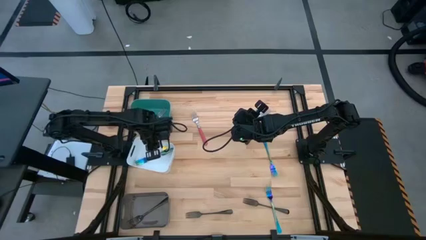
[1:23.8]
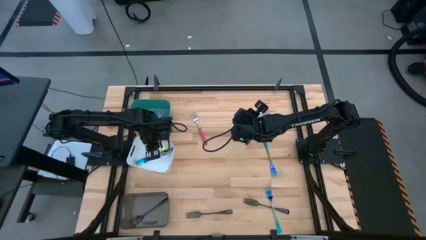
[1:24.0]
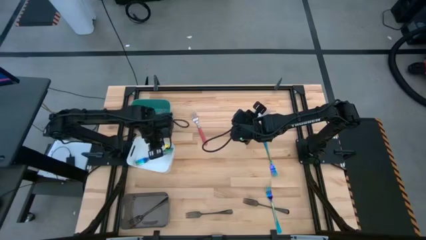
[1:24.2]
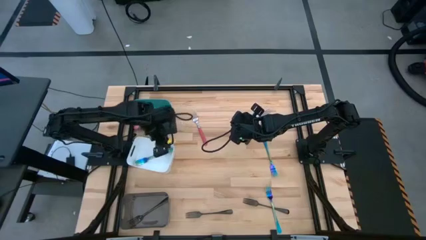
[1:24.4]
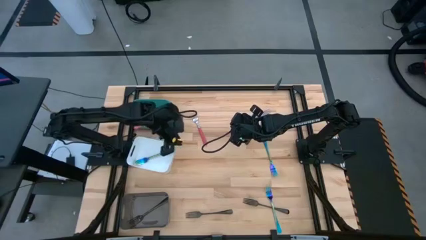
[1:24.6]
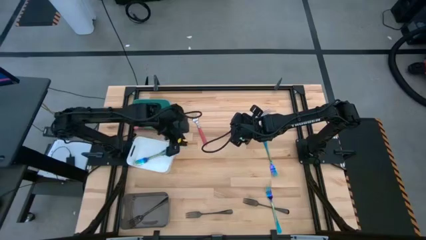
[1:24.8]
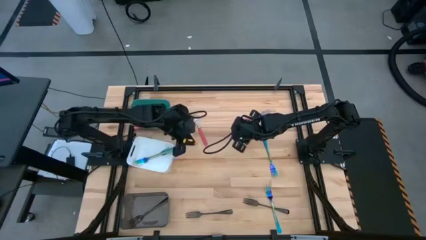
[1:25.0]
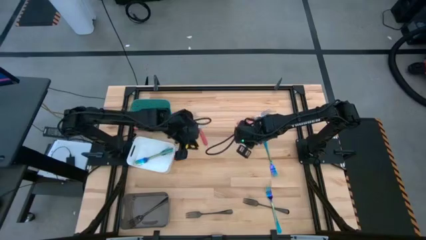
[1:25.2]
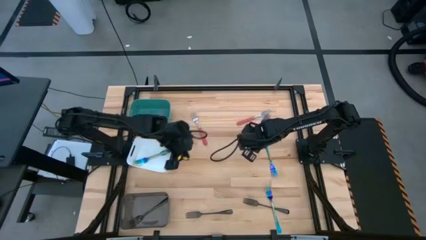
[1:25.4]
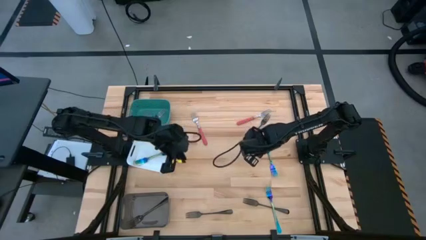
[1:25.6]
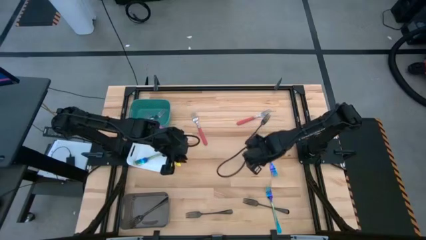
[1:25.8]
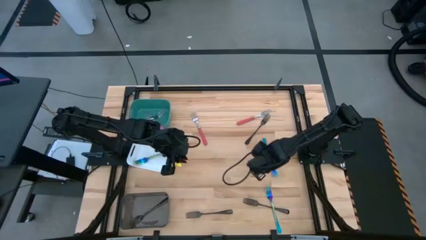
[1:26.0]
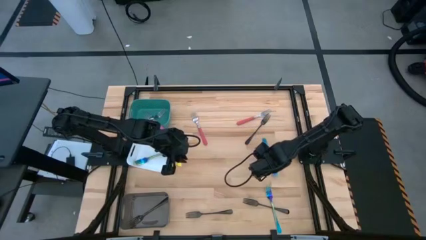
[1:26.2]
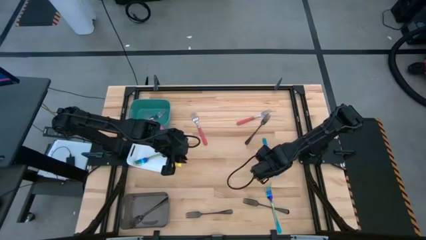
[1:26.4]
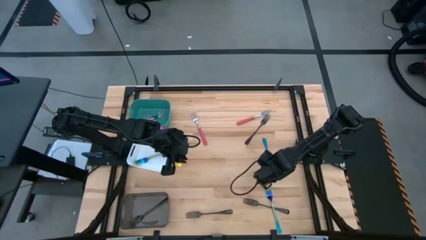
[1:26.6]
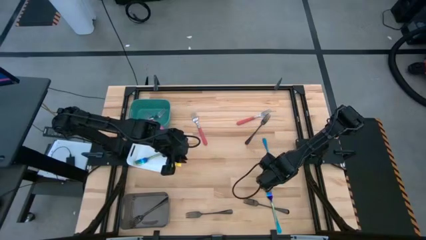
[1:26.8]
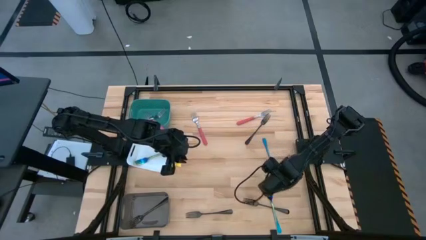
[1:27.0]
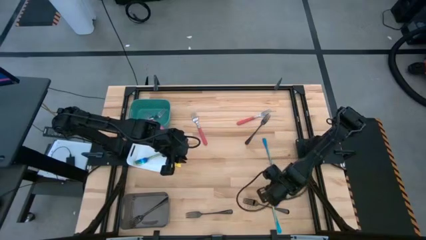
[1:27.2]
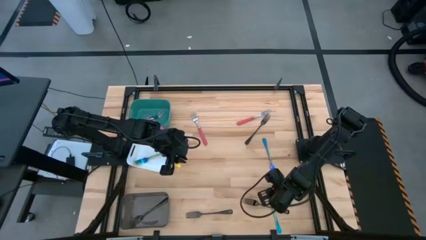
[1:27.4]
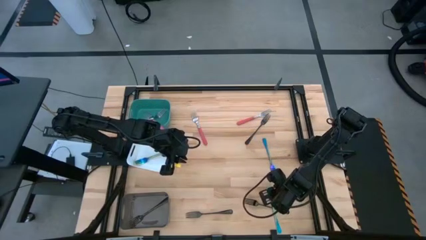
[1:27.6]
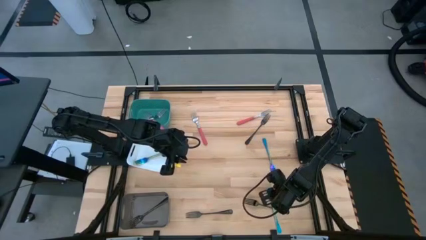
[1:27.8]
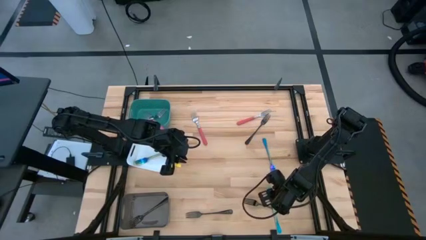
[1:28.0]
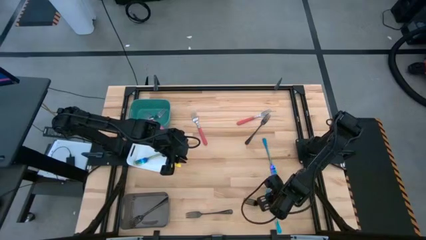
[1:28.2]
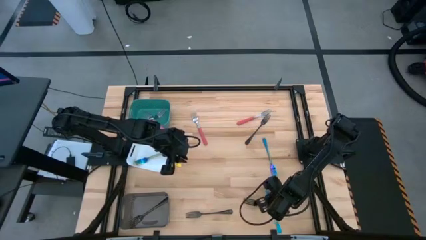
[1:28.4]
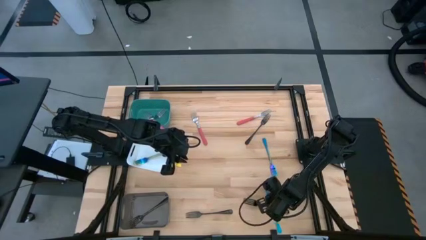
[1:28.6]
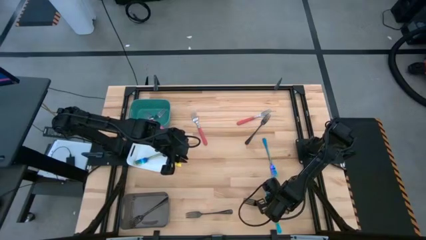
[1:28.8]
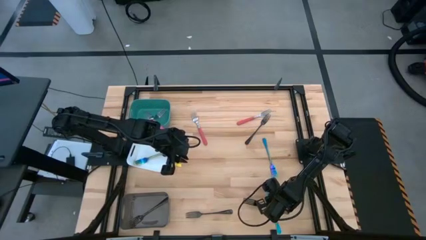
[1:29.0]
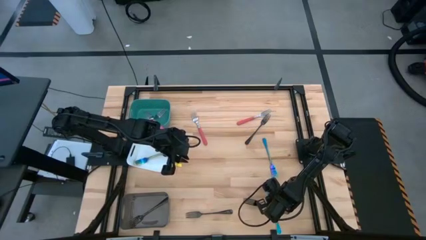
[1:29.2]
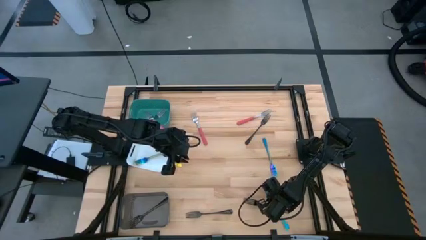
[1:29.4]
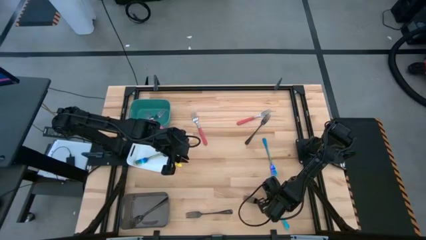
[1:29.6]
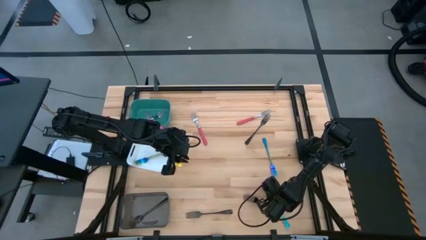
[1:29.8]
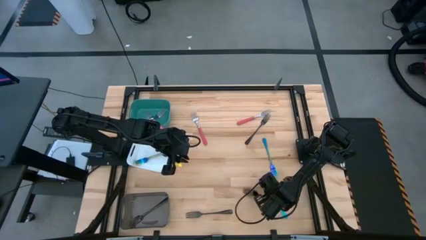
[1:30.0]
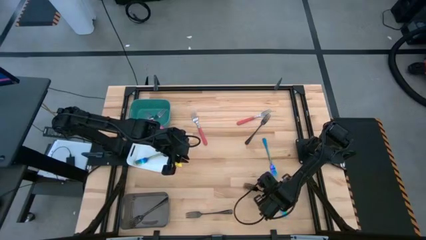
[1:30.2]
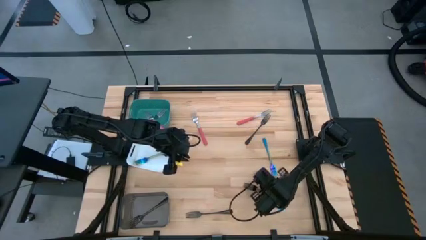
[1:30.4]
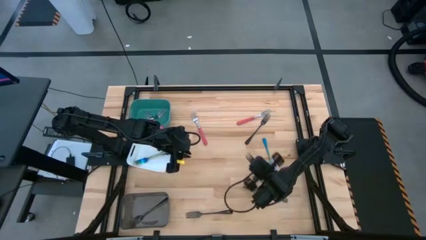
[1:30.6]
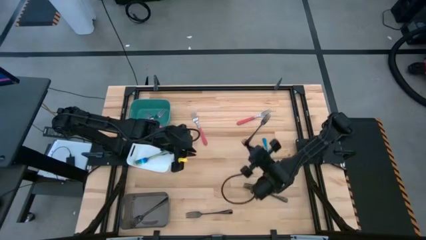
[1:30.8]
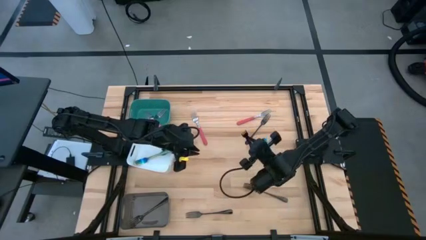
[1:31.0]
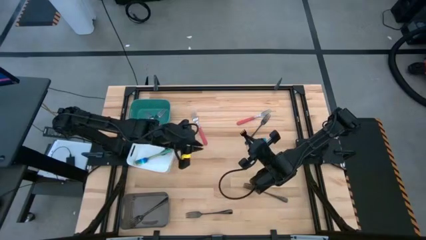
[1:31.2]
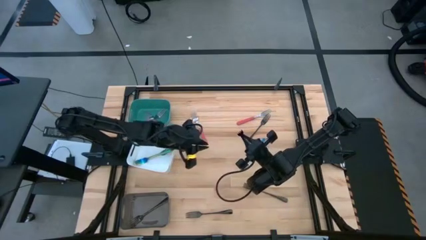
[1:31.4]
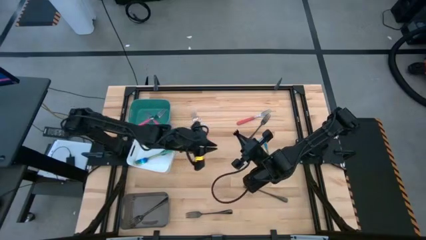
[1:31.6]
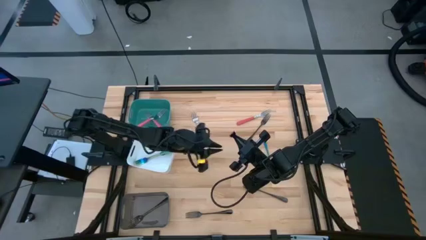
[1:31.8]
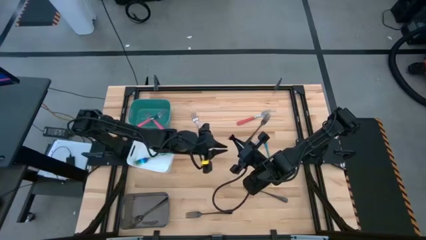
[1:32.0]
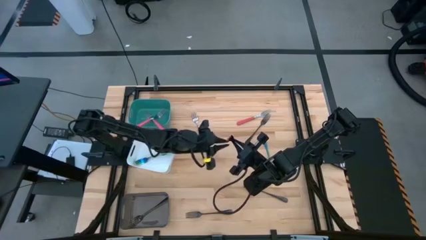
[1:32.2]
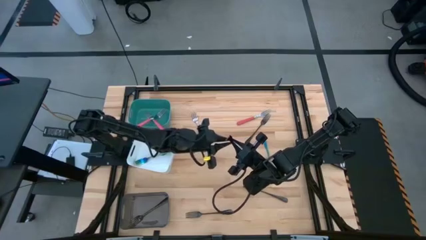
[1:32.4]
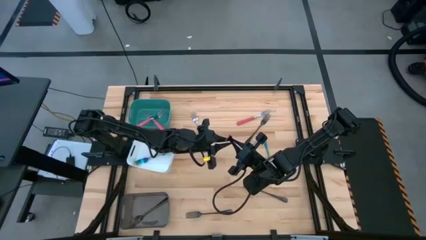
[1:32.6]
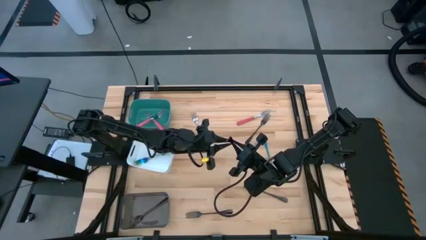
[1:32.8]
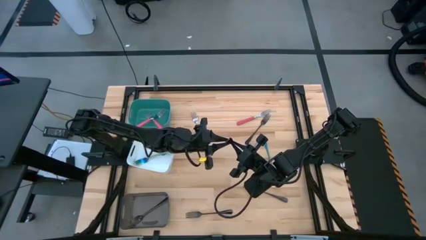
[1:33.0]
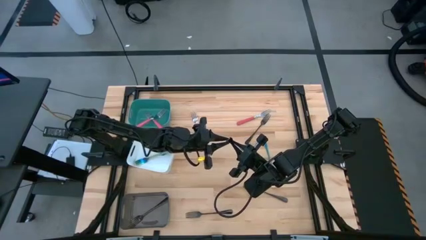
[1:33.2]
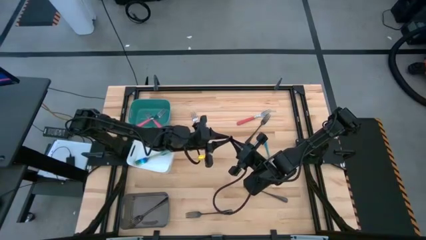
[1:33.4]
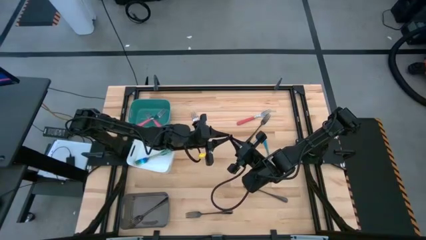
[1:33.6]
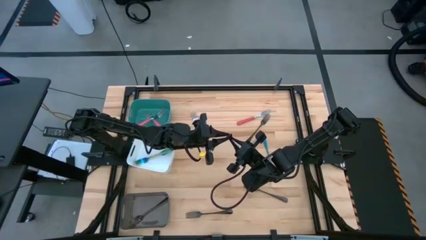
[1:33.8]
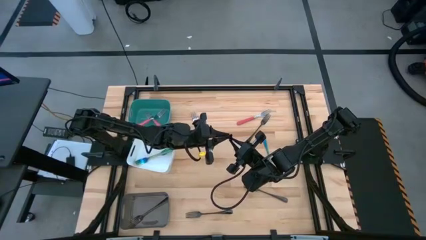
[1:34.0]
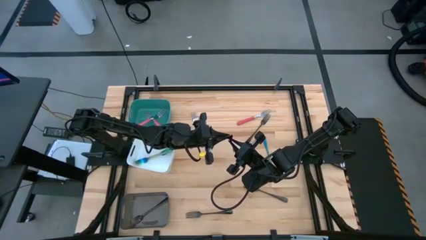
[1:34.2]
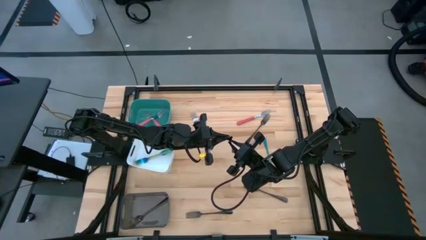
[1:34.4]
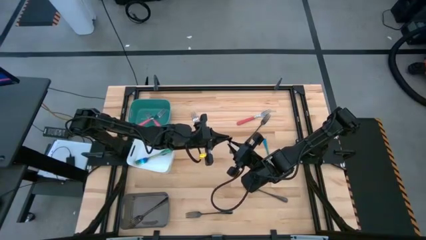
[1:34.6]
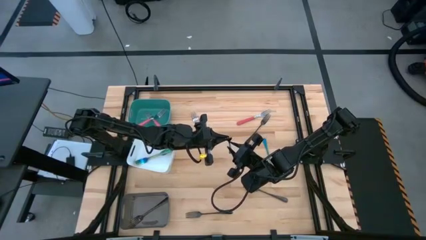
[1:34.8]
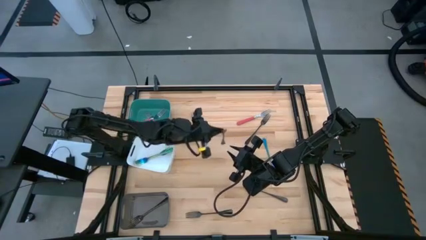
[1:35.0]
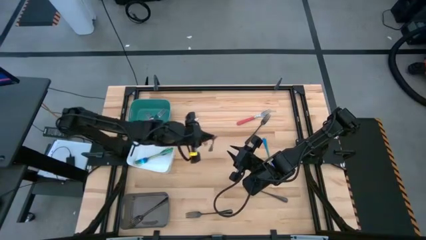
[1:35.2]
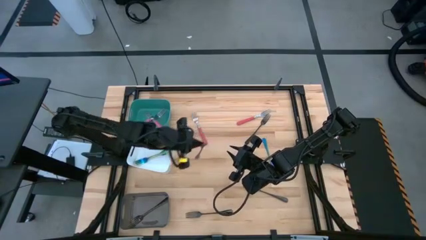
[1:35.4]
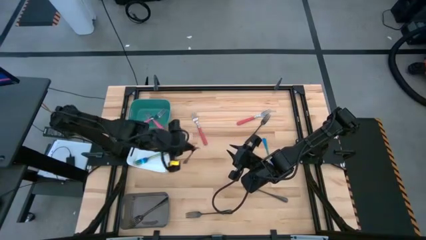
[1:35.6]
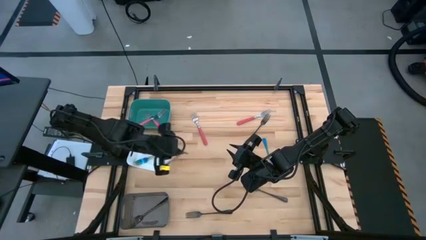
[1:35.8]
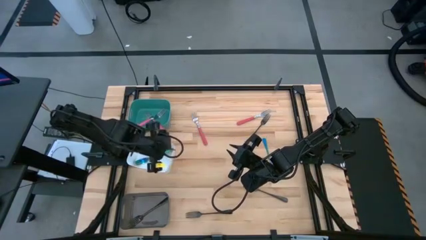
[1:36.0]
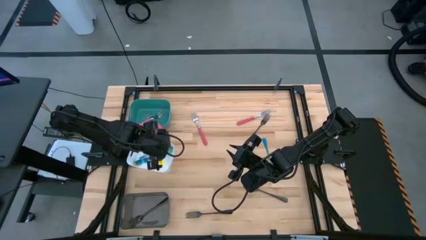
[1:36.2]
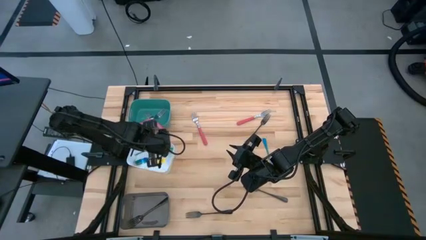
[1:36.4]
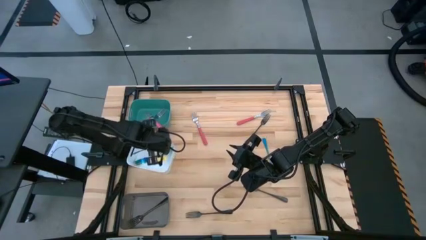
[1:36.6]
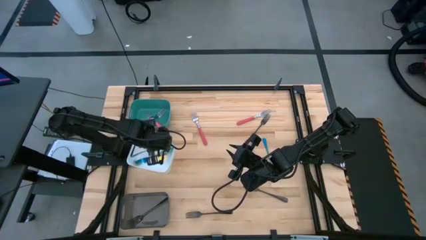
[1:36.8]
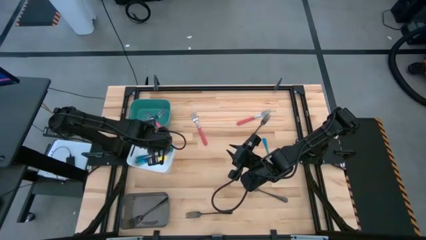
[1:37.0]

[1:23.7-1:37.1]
Task: Sort silverware by color (type)
Put the blue fork into the white bin

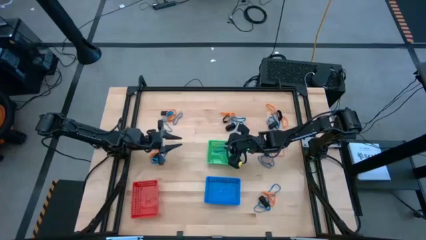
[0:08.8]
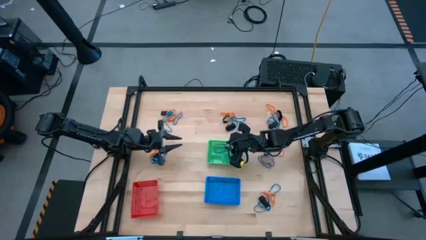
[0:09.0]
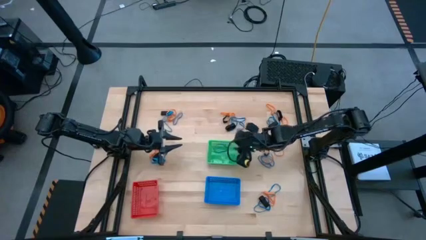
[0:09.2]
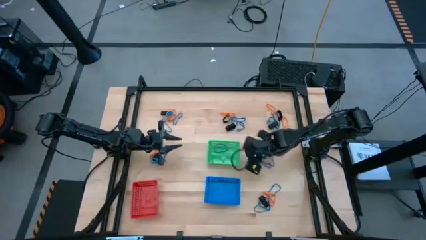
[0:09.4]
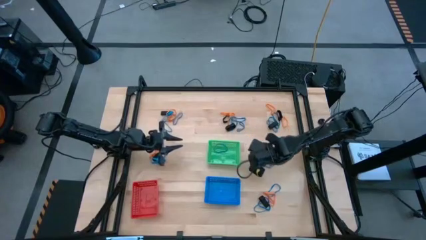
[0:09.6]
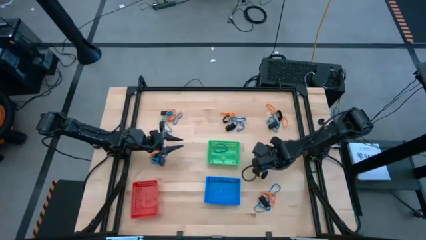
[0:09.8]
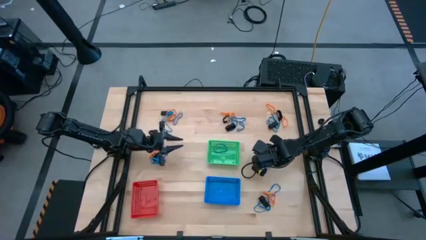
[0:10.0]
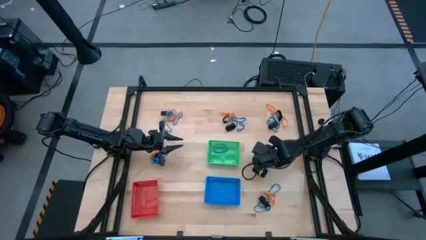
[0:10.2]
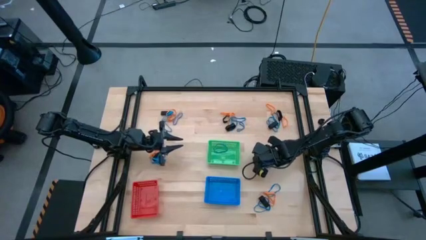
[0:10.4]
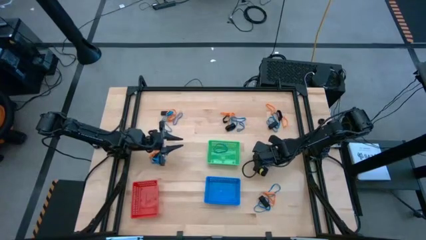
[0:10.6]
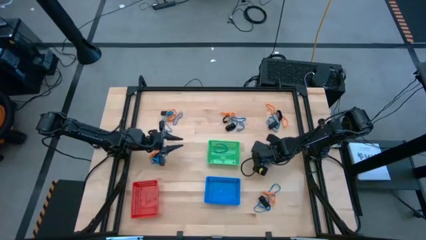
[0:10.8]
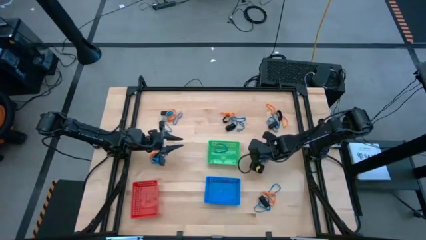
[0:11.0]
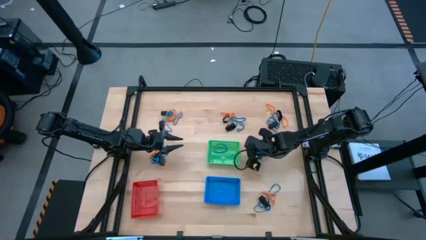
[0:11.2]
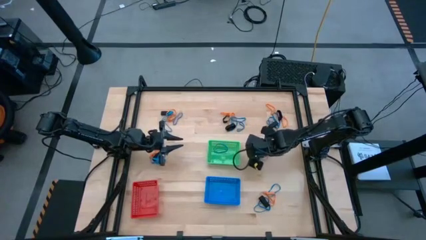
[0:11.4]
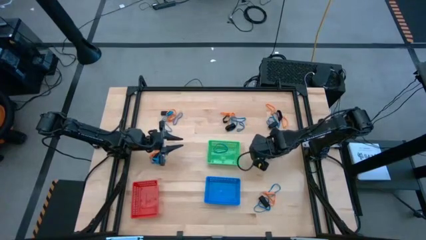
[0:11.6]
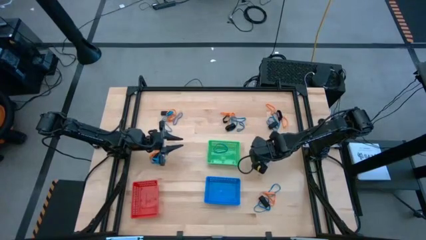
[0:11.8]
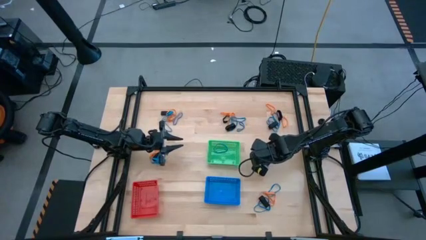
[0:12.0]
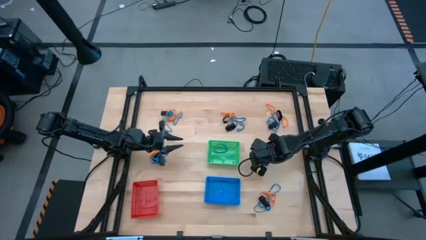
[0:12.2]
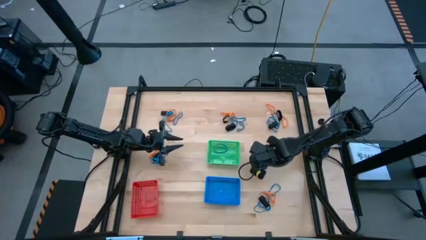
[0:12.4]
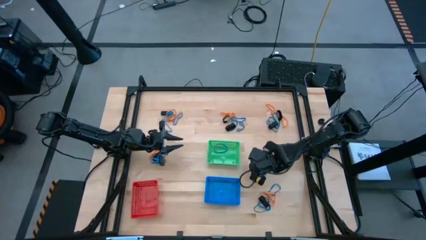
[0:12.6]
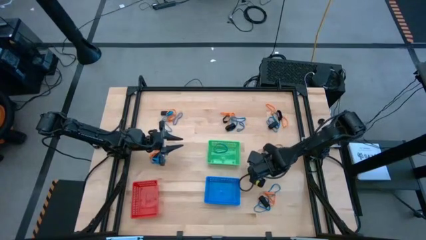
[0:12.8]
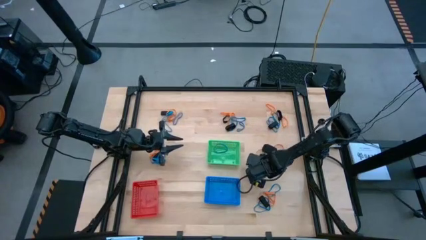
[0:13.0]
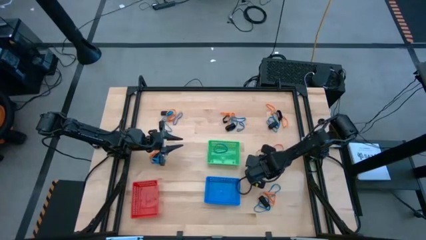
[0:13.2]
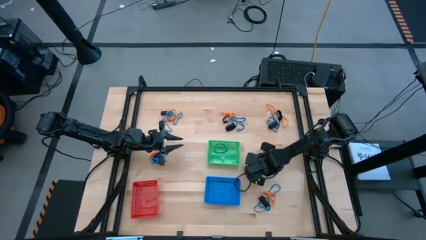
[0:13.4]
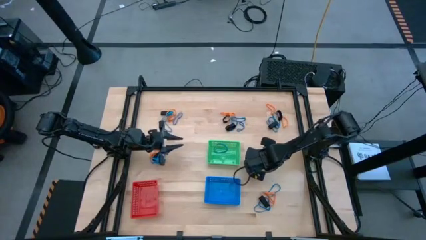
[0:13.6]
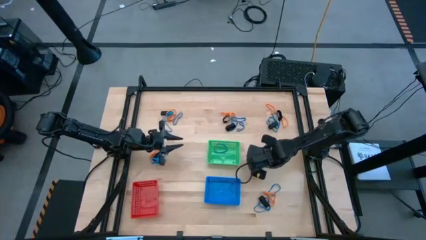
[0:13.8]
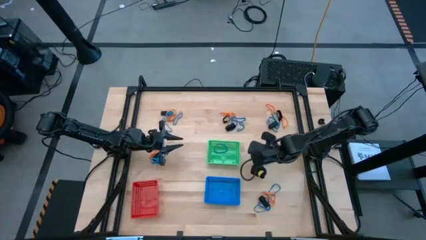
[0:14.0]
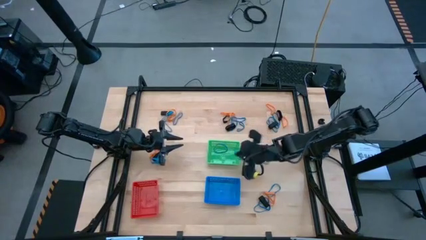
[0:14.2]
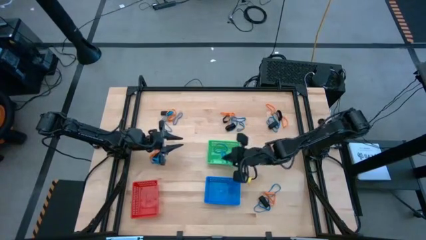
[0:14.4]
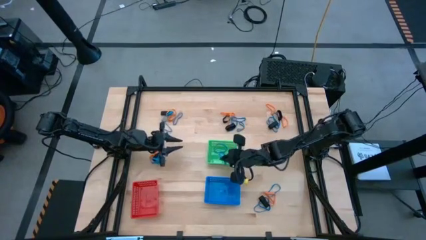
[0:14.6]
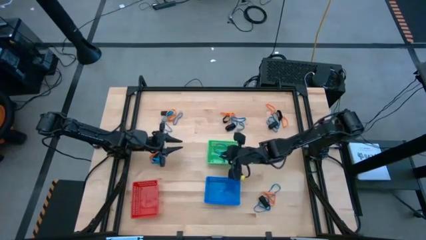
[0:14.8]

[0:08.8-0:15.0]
Task: Sort rubber bands into baskets
Put the blue rubberband into the green bin
